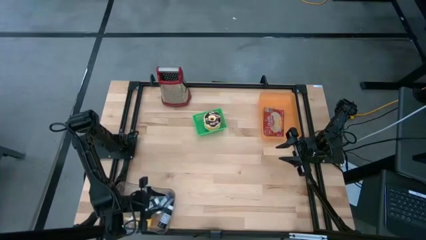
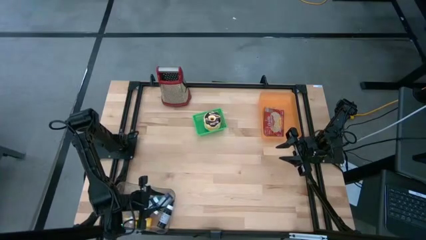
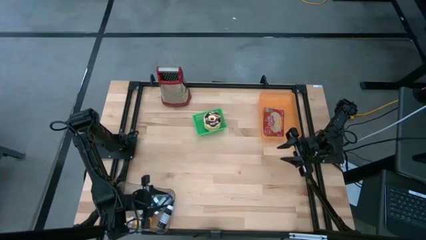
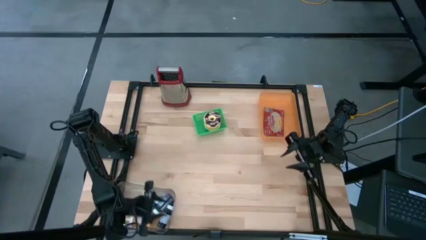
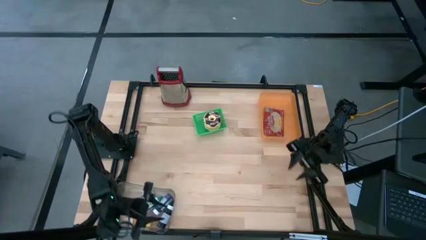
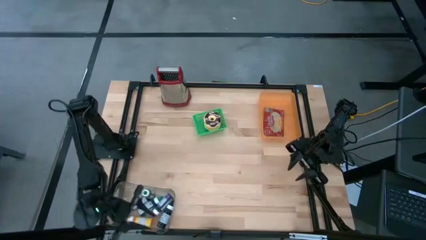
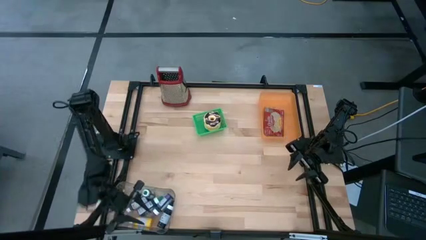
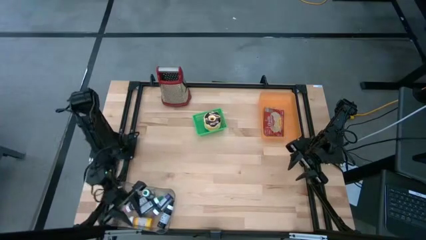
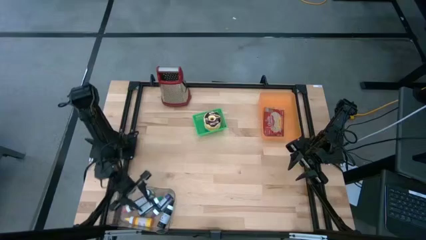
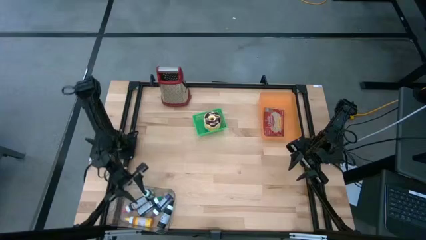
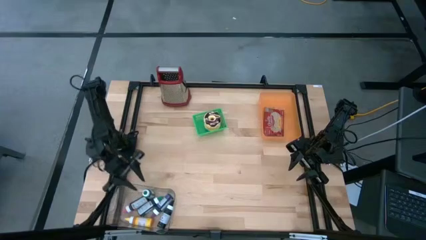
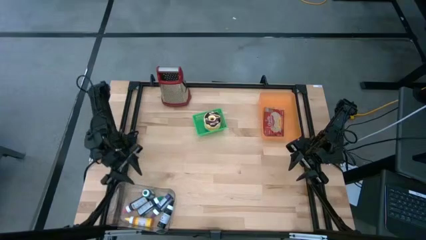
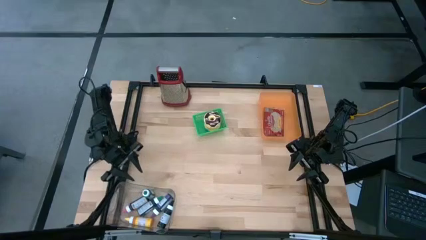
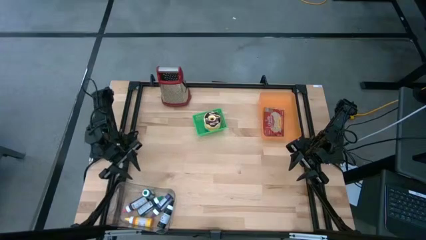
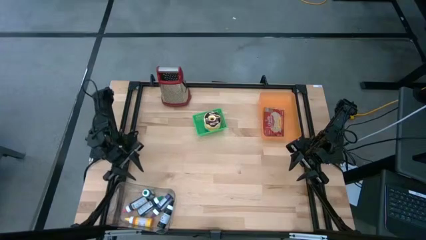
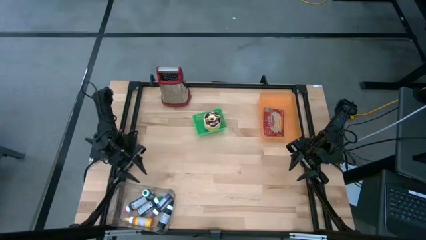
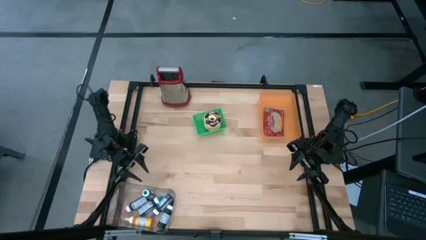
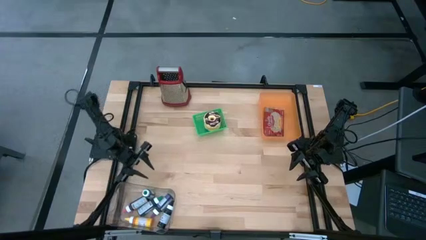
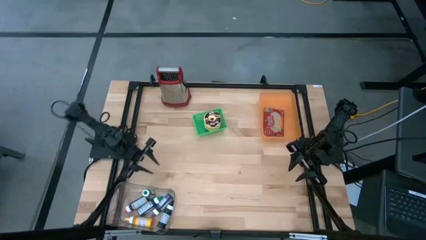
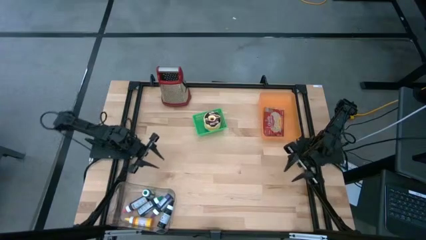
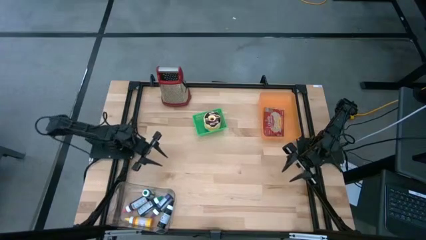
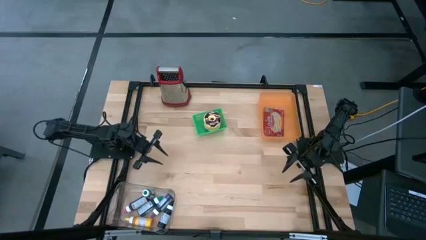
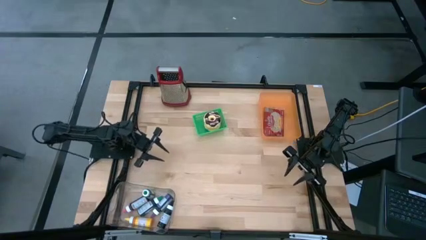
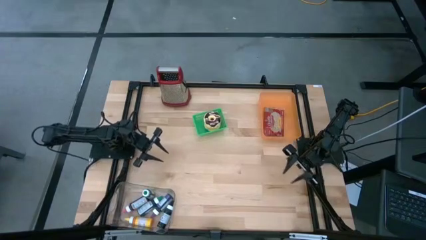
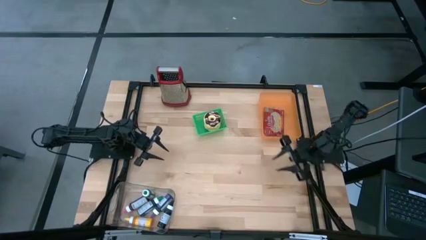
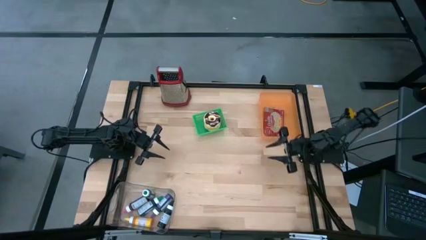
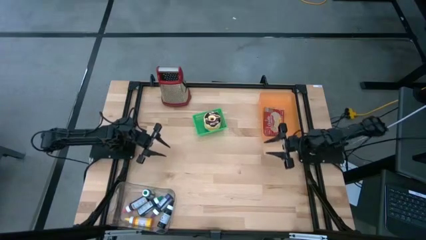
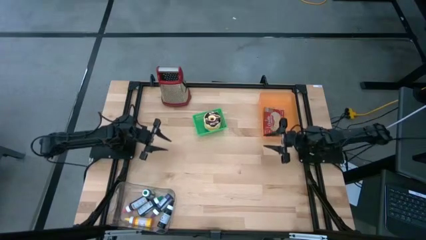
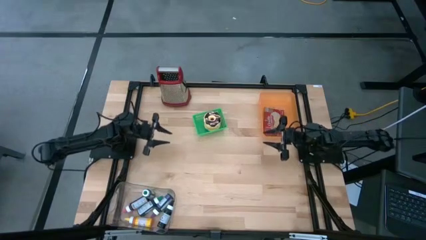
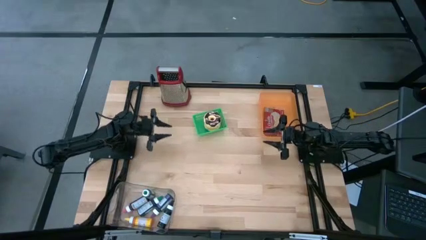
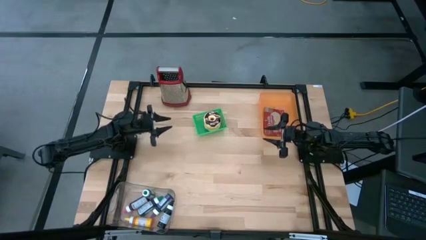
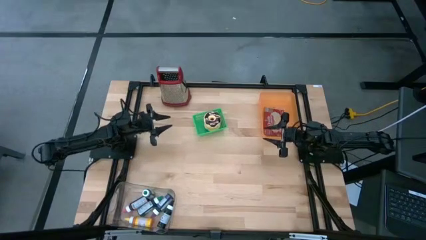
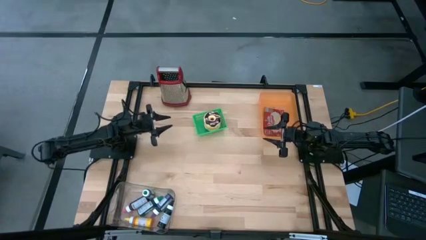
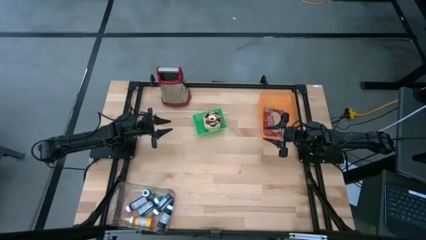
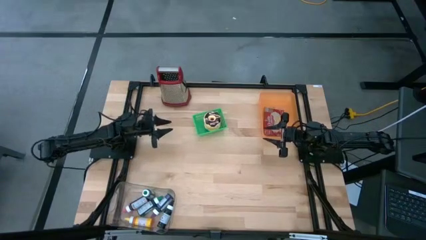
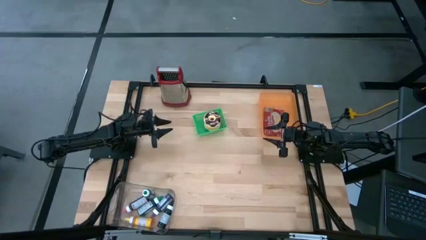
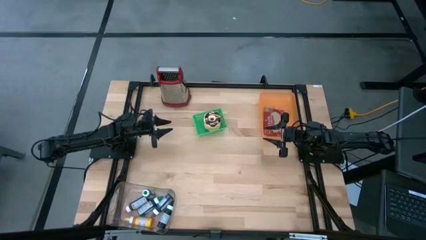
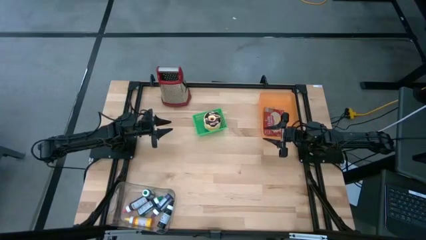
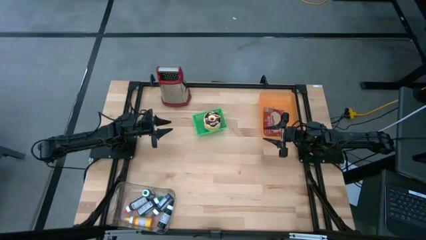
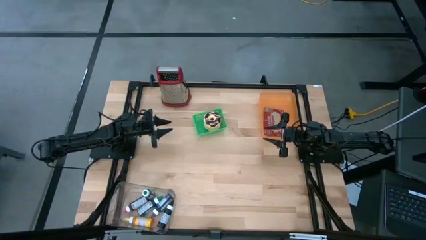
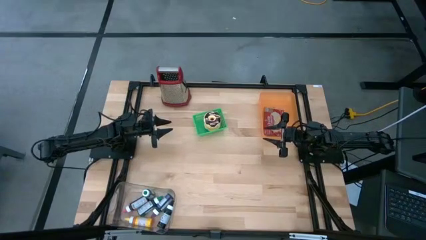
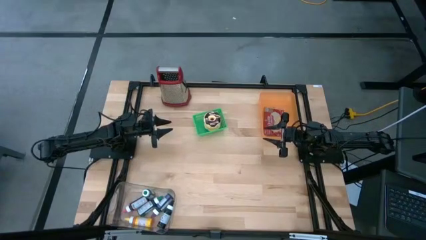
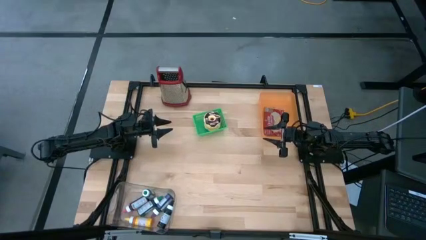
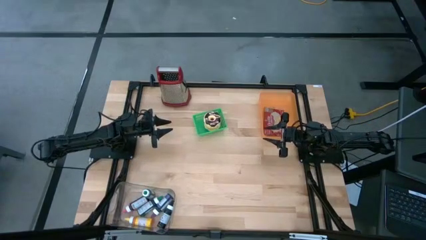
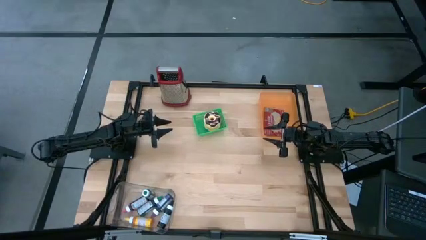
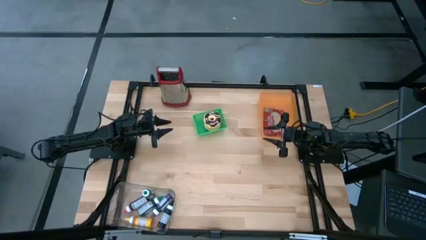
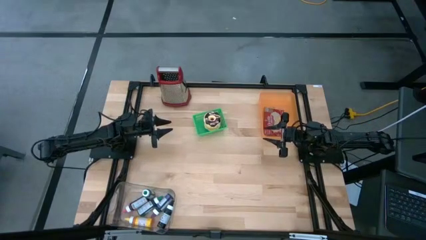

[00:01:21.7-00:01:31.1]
Return to Home Position
